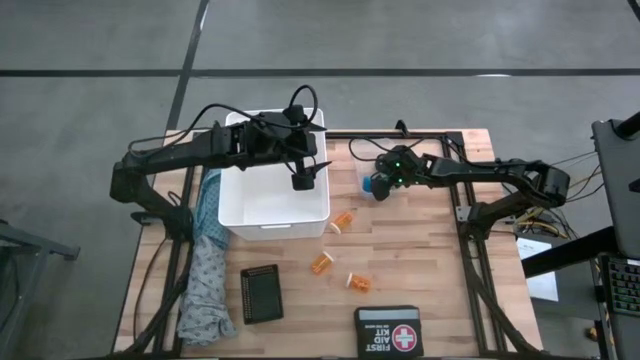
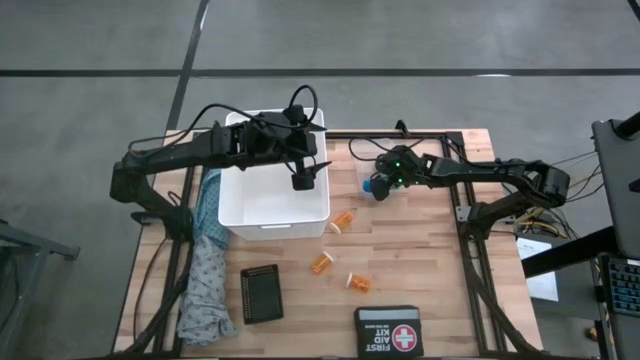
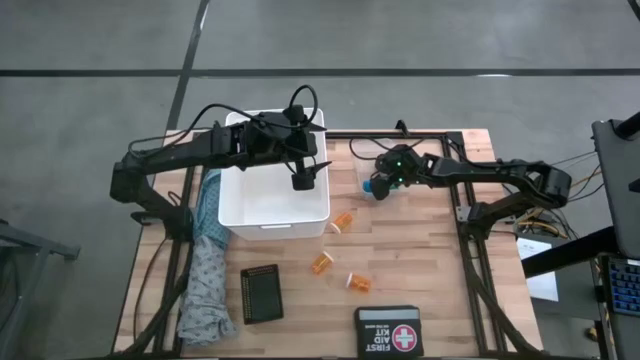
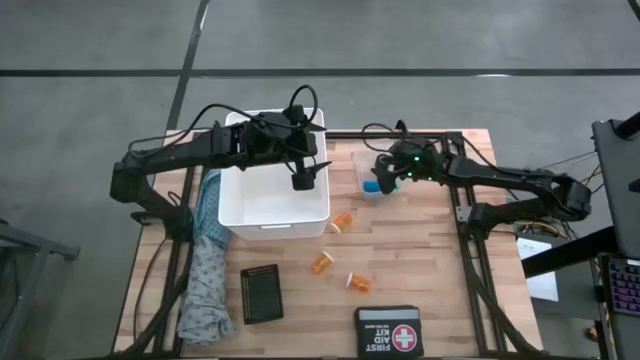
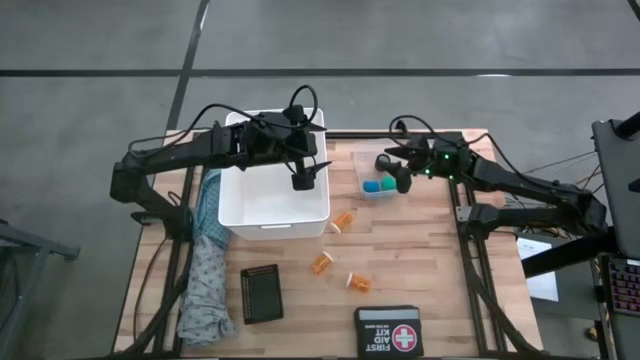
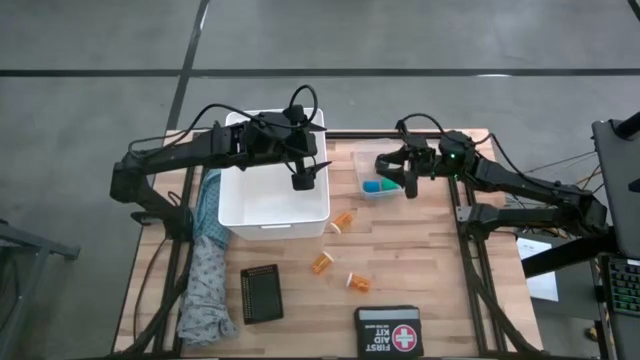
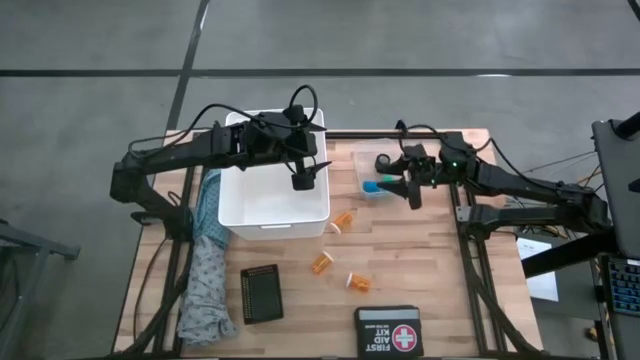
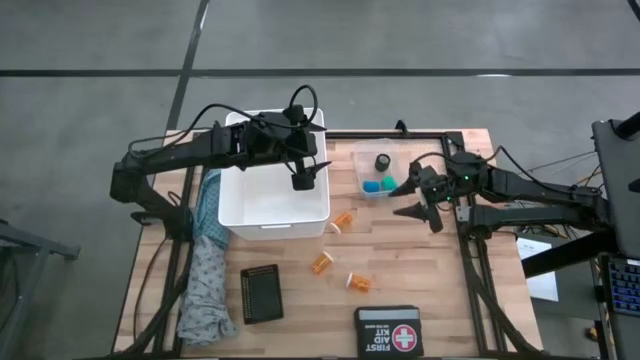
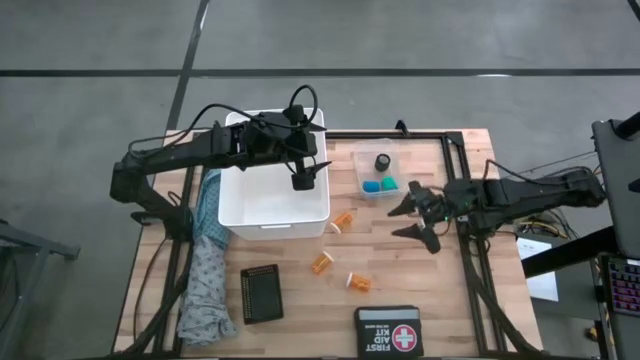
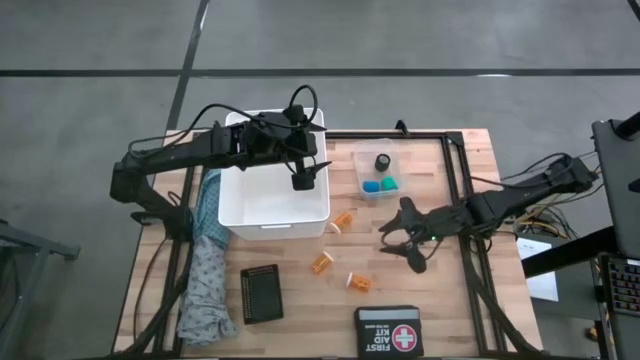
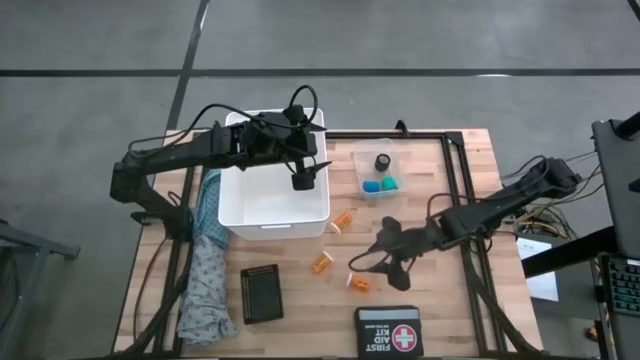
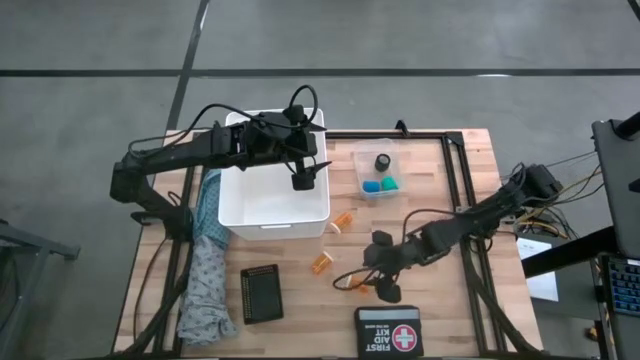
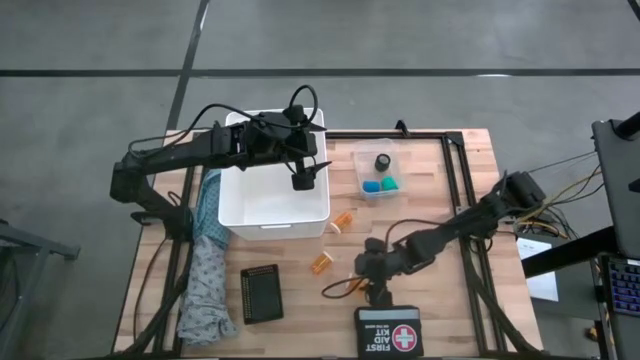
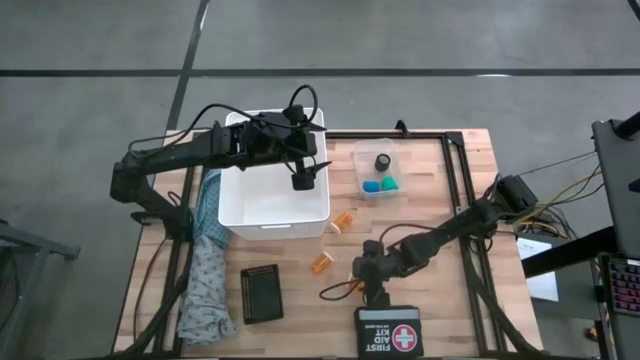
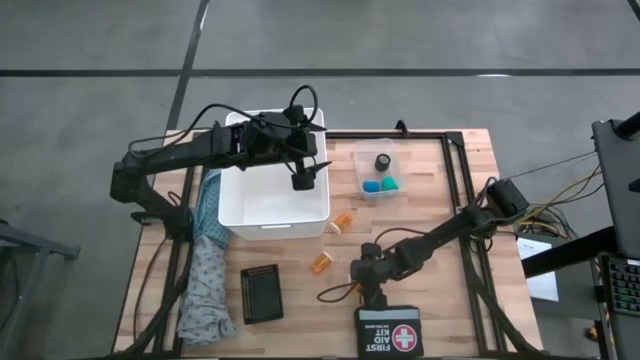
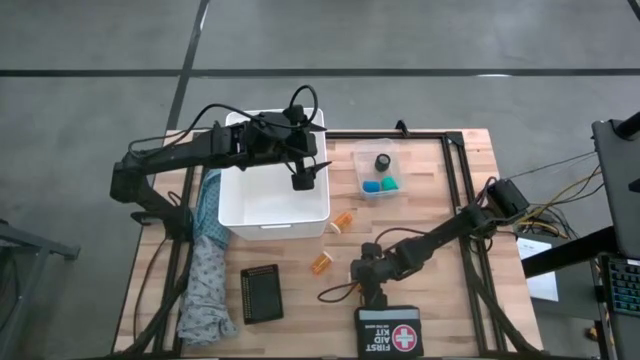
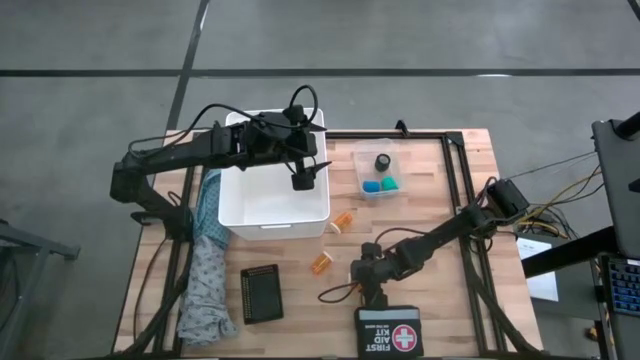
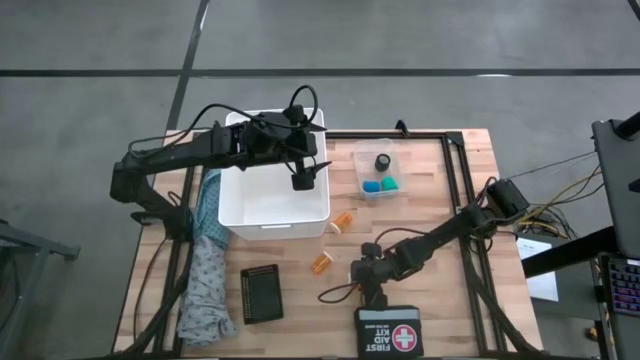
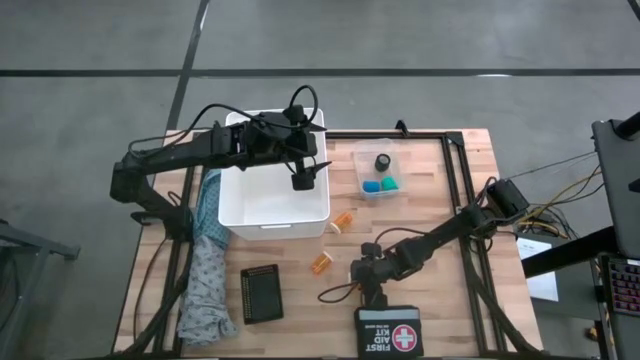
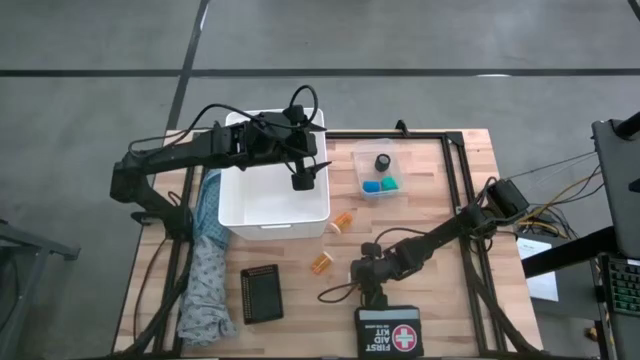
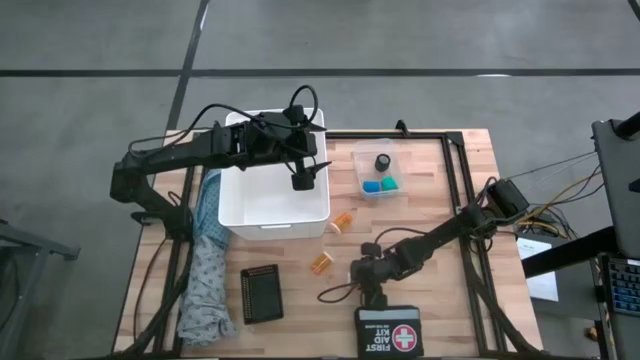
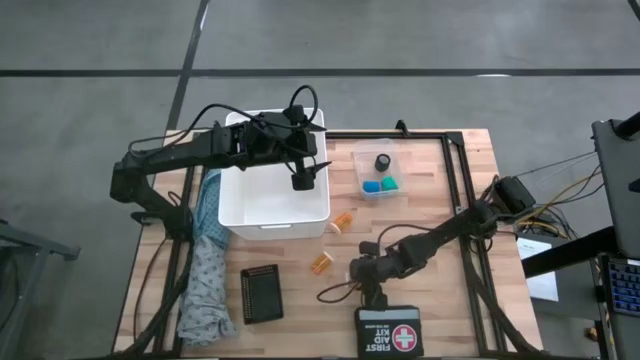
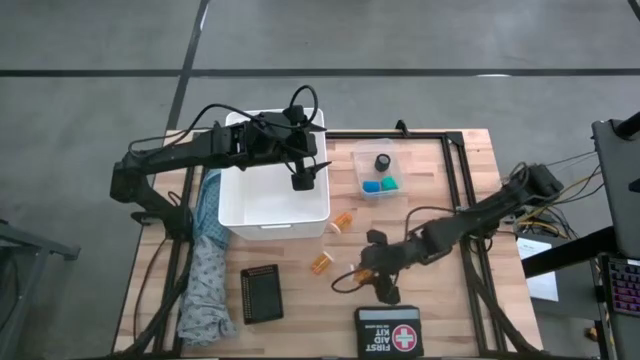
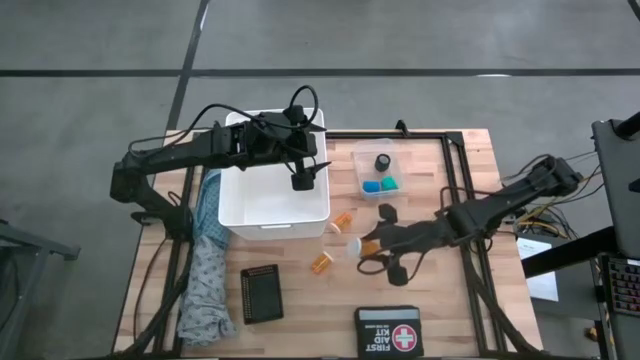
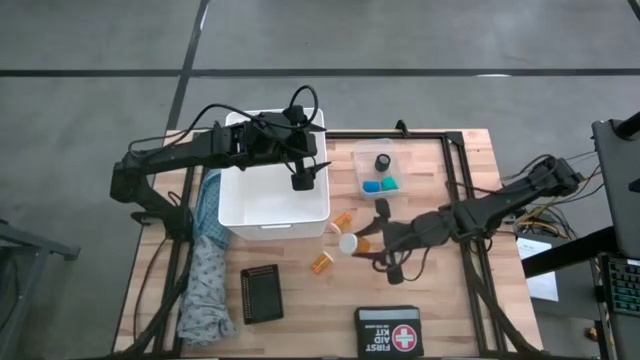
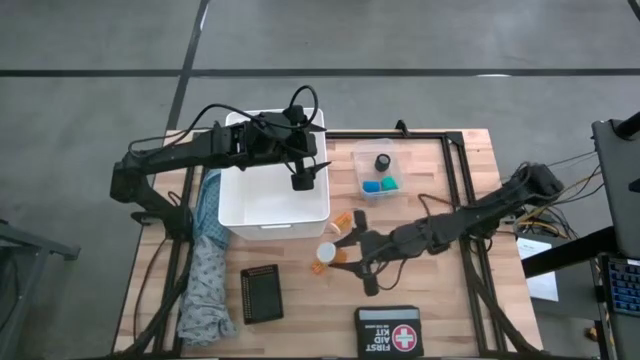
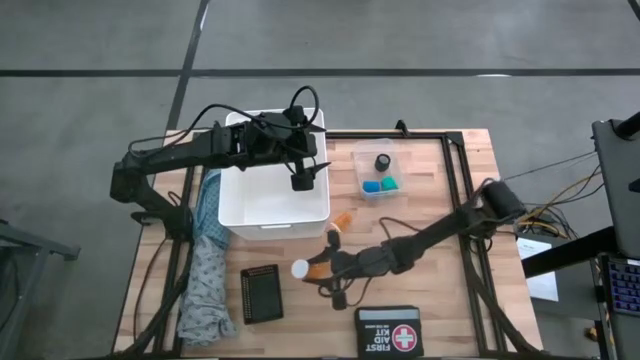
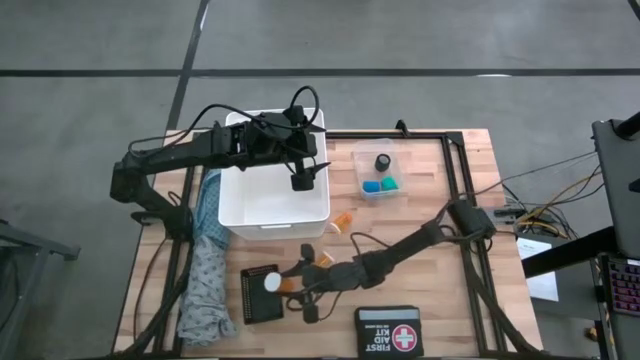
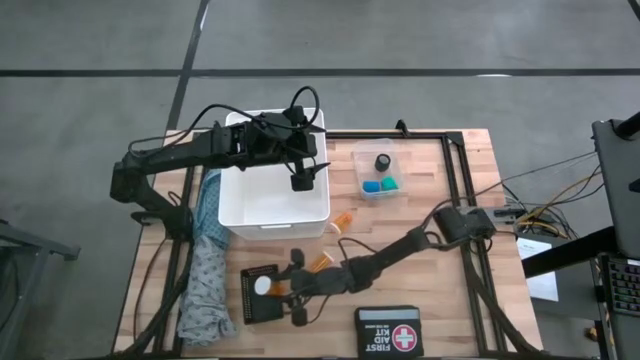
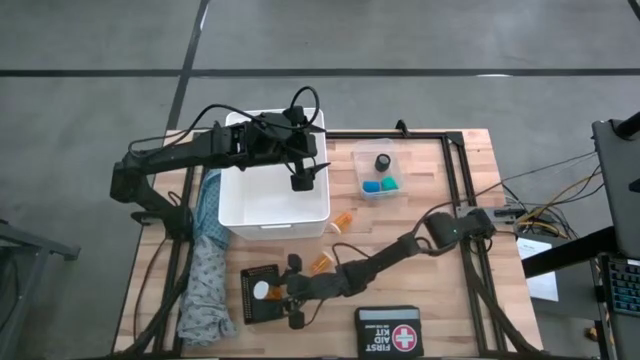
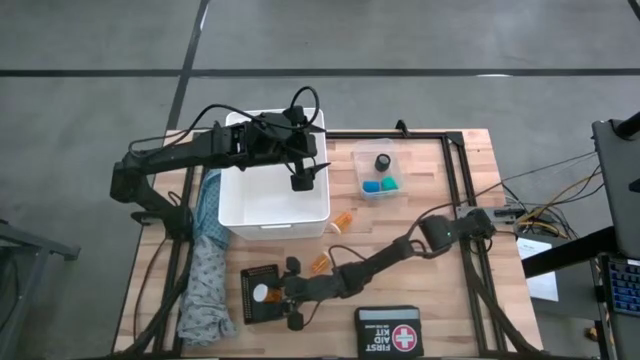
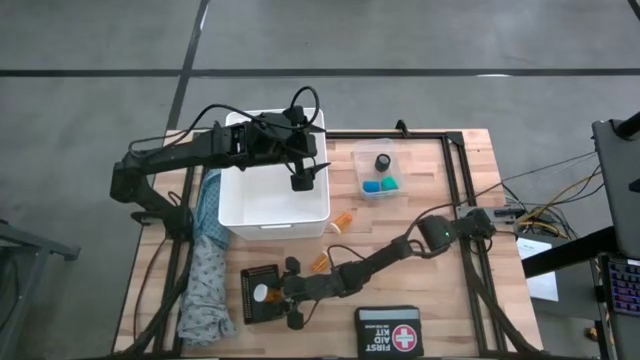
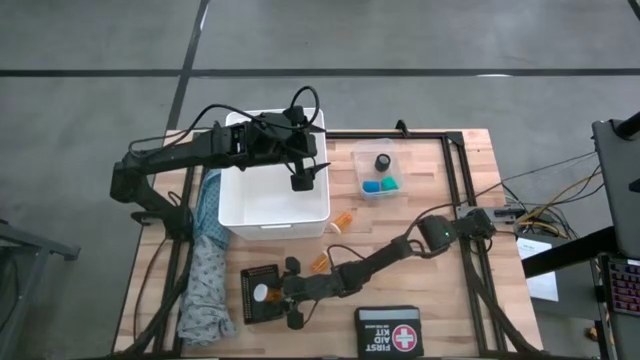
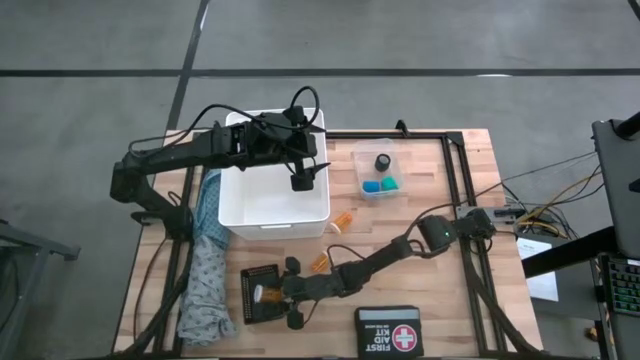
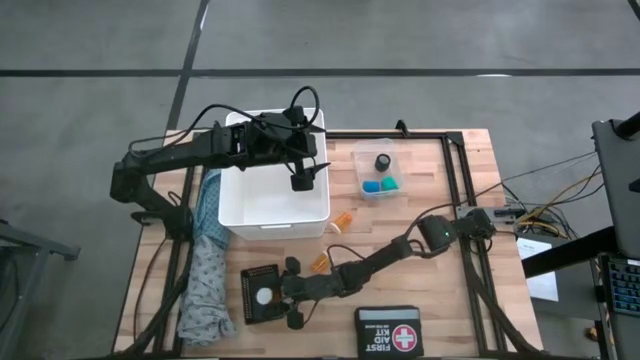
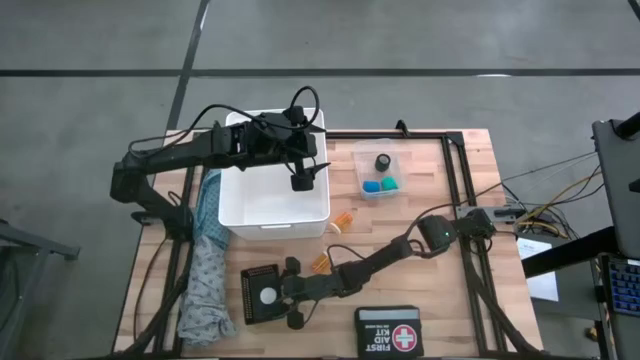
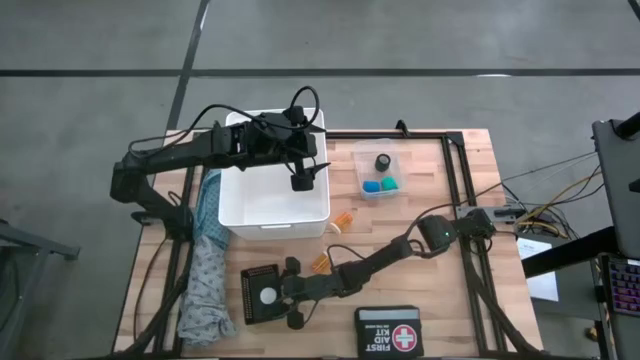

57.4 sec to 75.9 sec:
Task: Pick & place medical supplies in basket/bin
Put the bottom orange pill bottle into the black bin

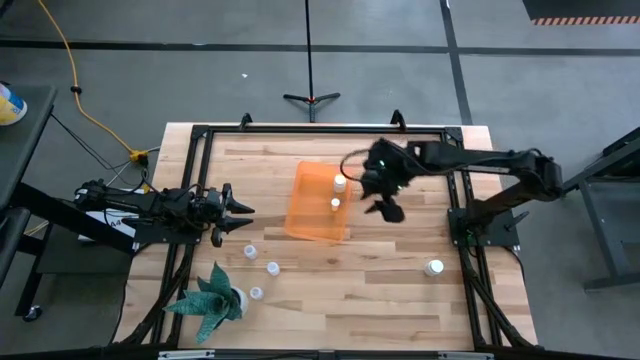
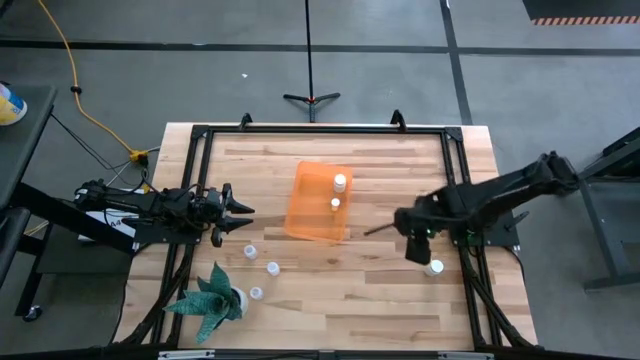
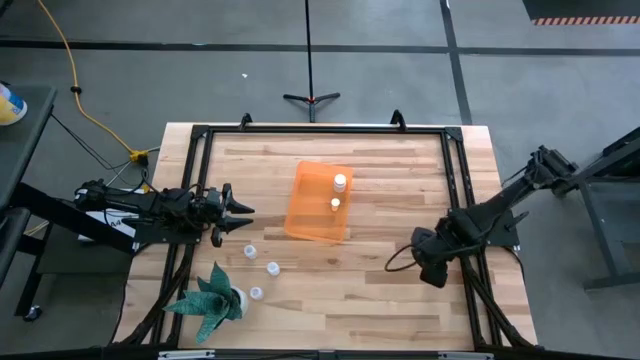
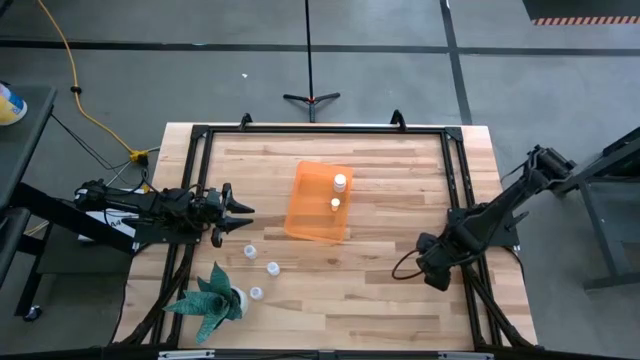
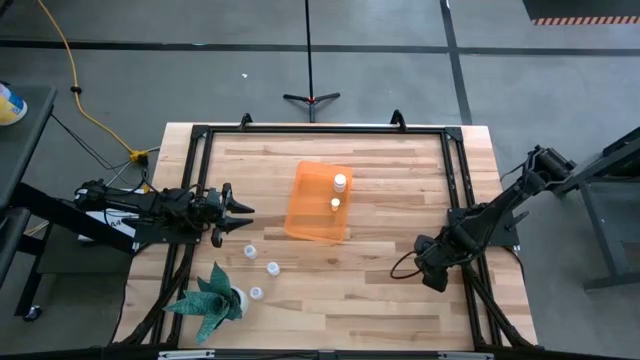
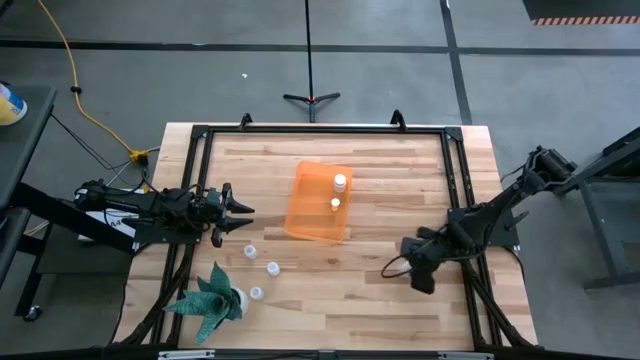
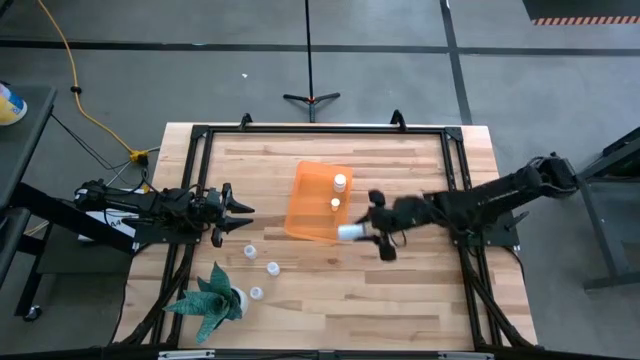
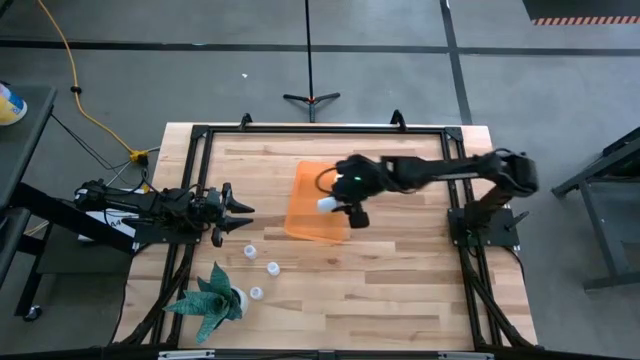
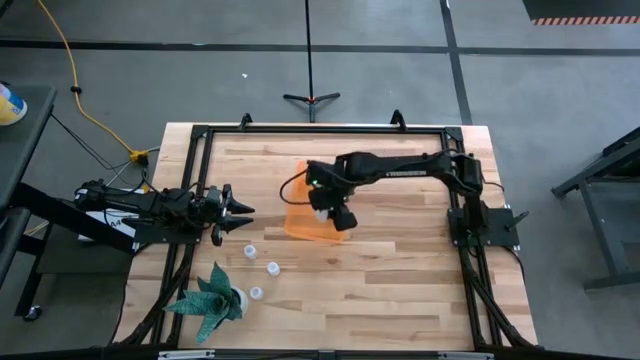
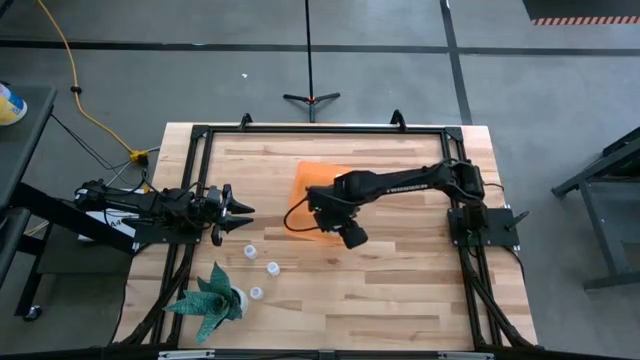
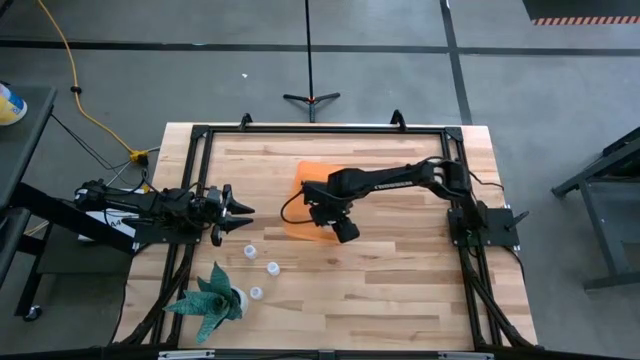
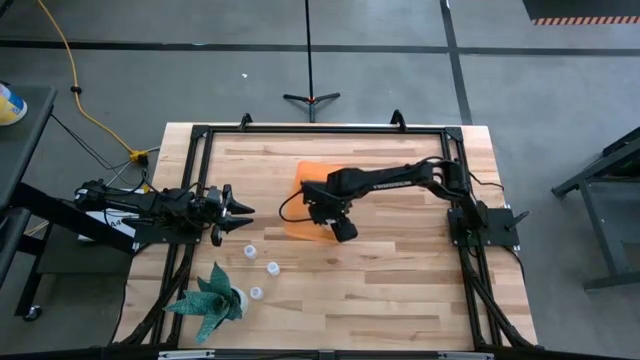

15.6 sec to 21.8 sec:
Task: Pick and place pill bottles into a basket
Put the white pill bottle into the orange bin
